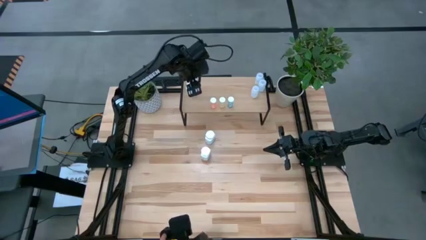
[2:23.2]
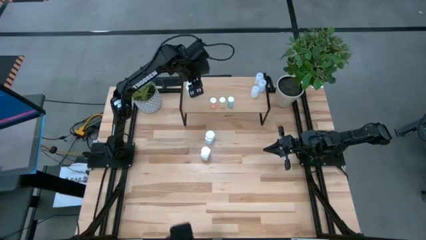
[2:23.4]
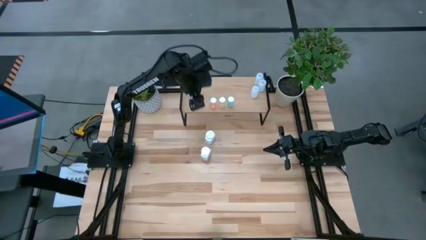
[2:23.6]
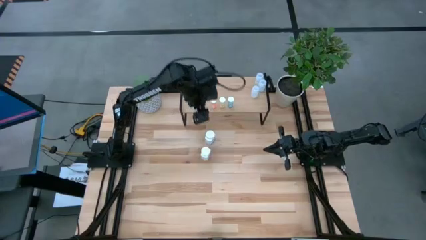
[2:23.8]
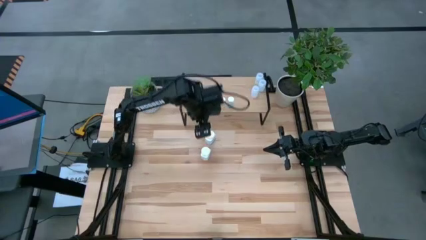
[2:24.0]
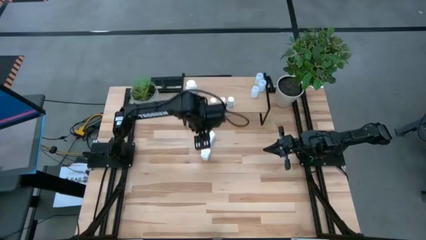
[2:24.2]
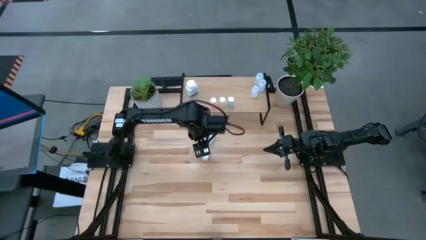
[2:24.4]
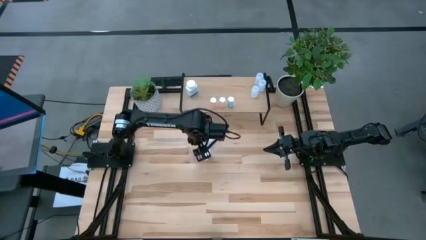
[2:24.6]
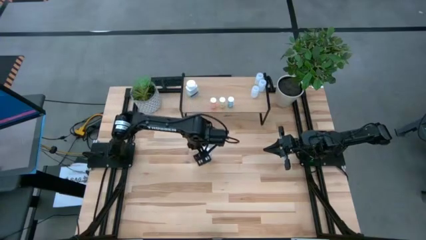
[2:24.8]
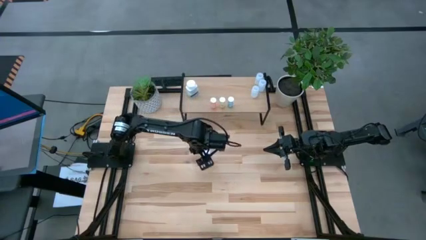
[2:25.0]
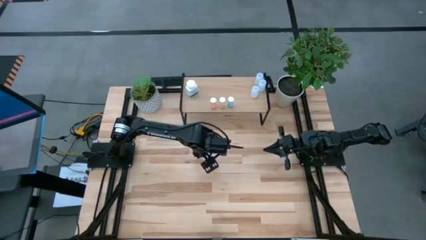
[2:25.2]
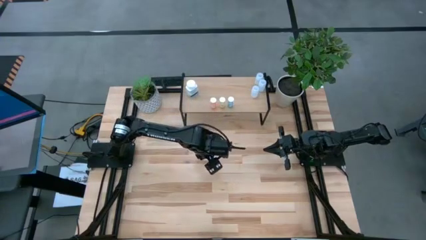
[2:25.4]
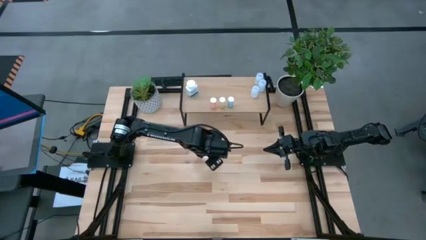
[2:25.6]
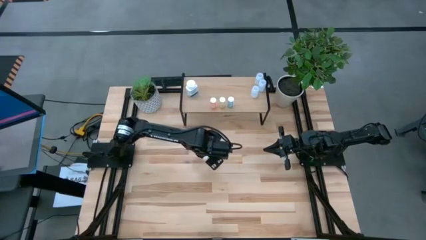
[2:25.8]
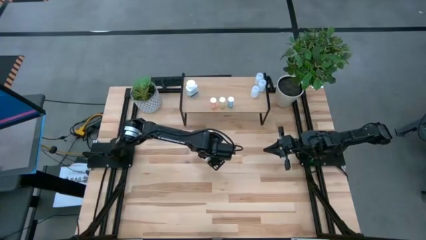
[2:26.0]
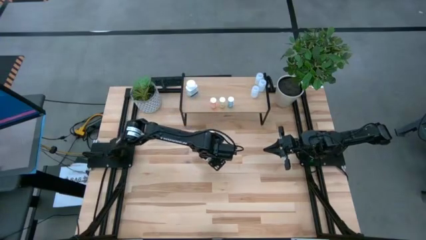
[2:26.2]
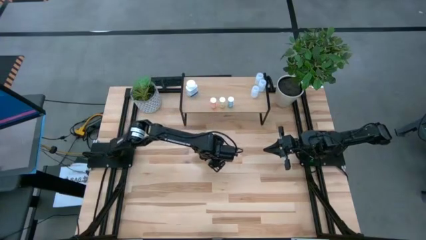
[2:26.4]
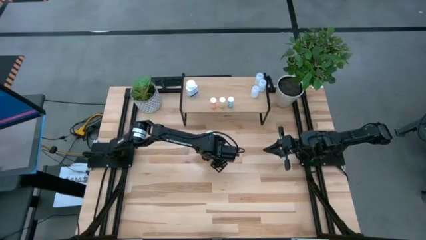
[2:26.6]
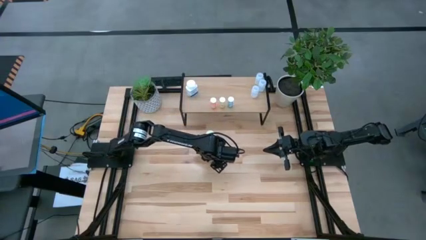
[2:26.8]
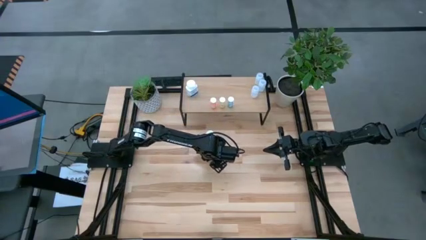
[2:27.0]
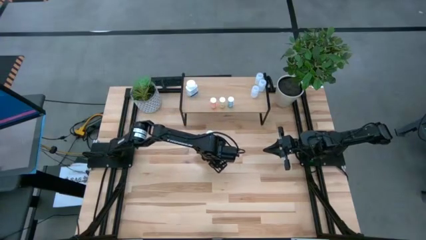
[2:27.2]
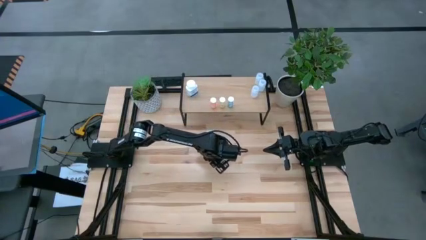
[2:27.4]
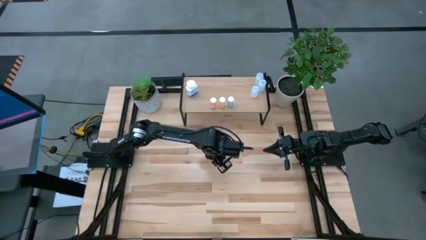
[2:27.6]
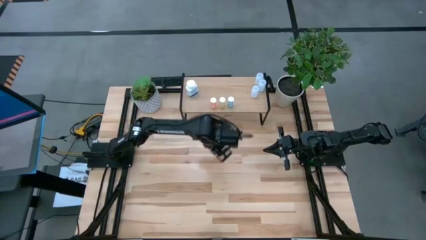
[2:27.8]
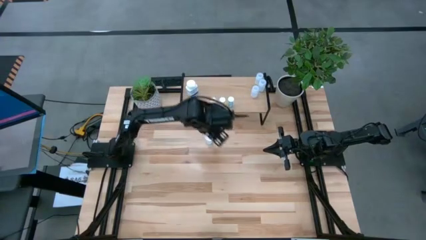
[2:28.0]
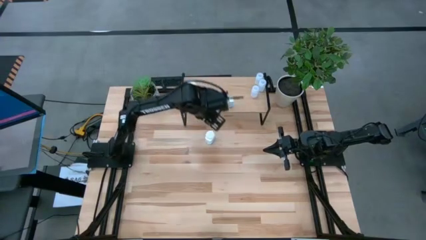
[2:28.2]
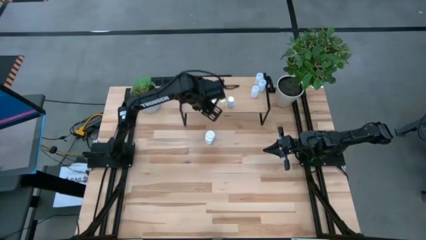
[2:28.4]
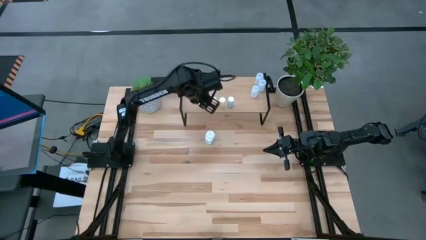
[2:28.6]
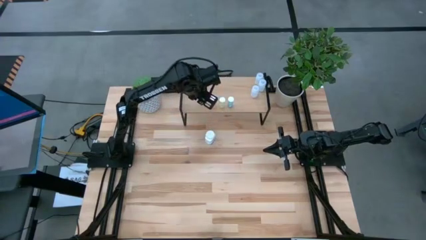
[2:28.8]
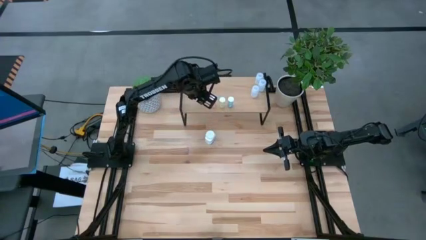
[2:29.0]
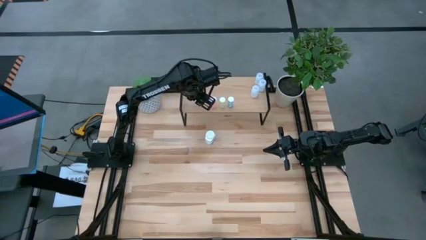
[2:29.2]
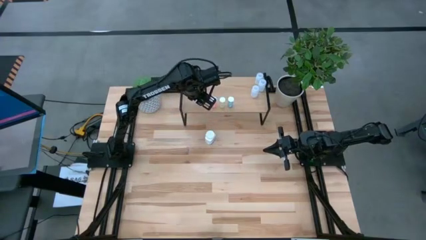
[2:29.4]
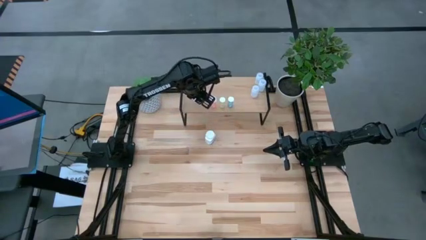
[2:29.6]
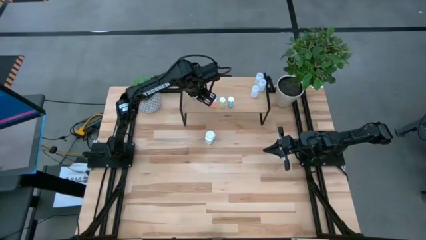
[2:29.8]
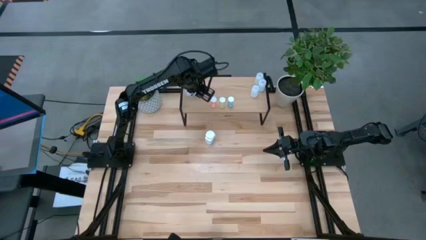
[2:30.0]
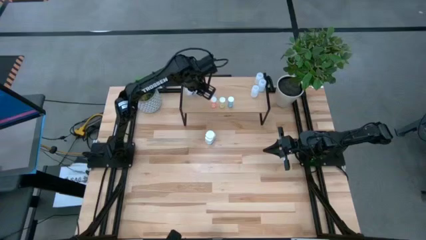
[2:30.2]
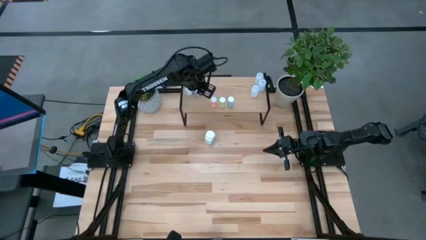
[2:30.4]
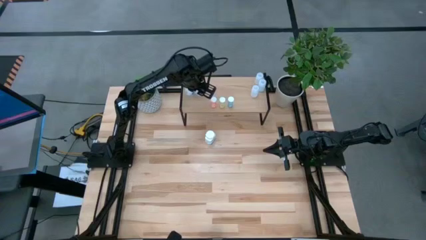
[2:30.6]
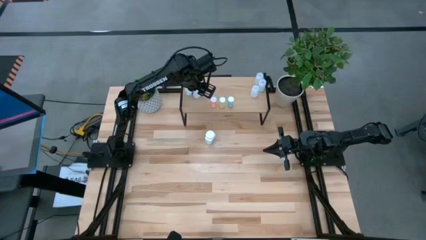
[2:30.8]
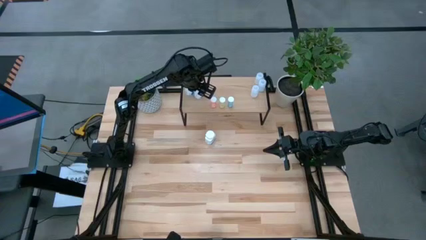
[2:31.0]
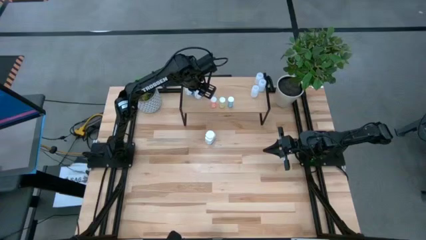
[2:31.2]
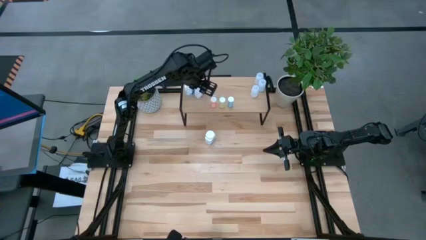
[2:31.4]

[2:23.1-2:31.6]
Task: Pick and place medicine bottles onto shelf by color
Put the bottom white pill bottle on the shelf
